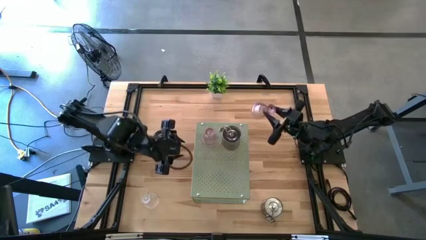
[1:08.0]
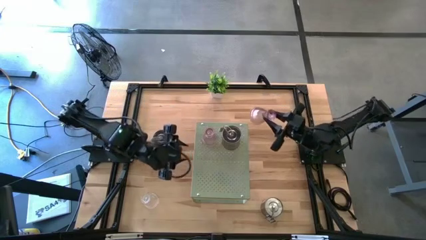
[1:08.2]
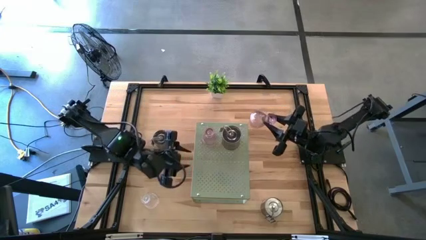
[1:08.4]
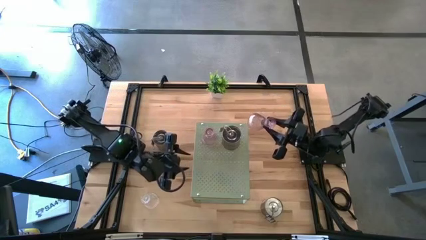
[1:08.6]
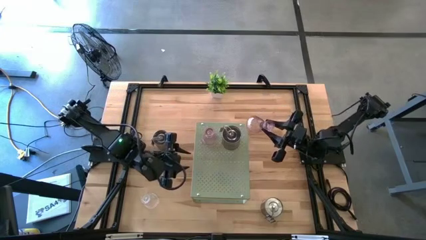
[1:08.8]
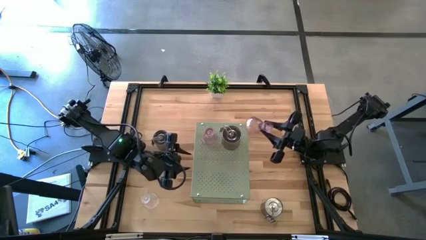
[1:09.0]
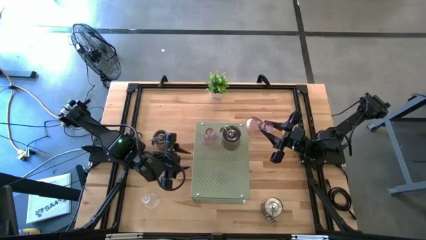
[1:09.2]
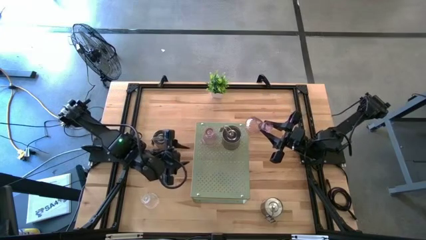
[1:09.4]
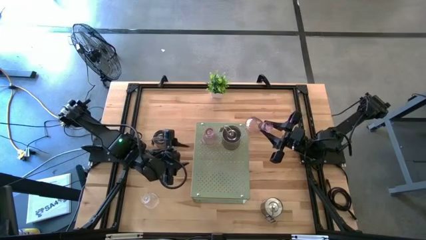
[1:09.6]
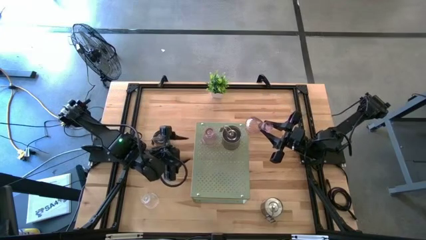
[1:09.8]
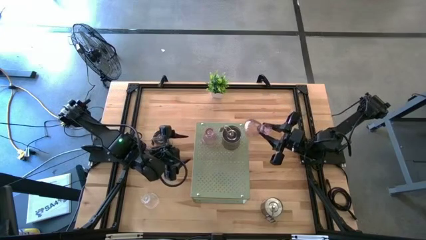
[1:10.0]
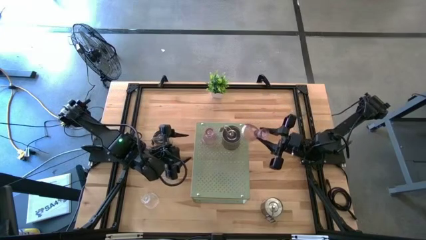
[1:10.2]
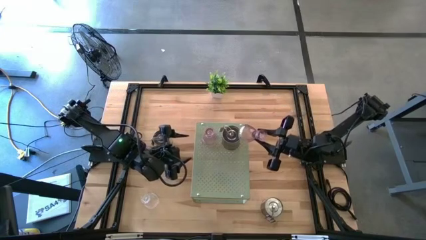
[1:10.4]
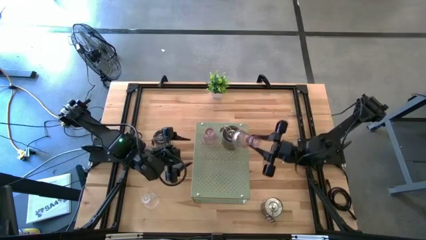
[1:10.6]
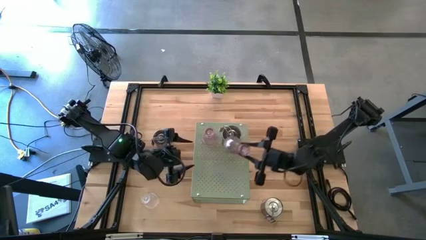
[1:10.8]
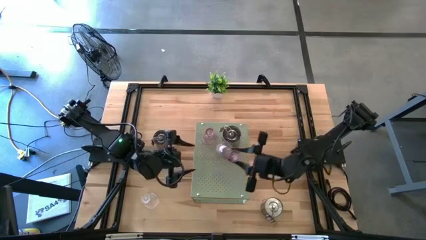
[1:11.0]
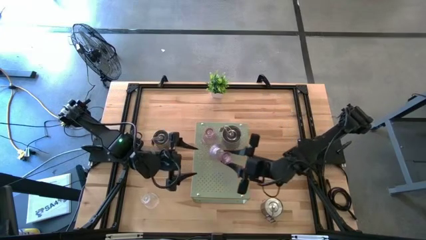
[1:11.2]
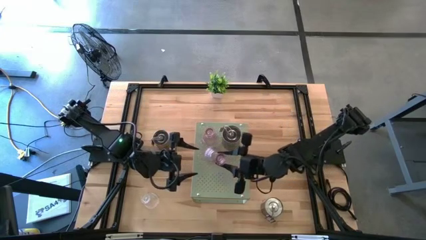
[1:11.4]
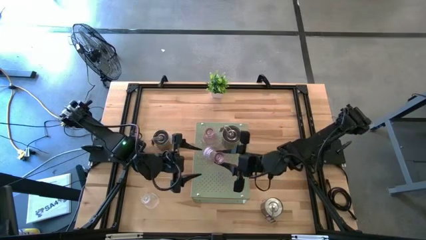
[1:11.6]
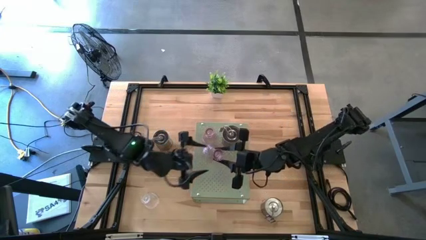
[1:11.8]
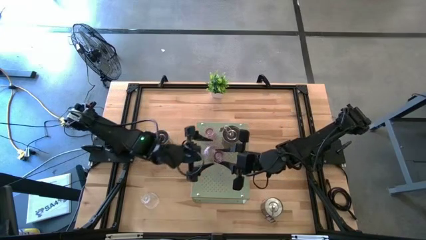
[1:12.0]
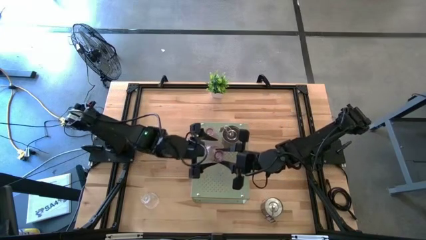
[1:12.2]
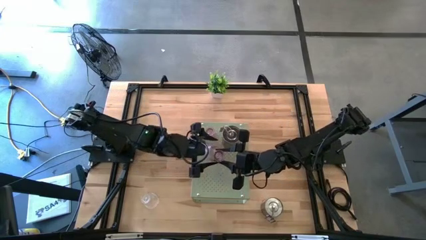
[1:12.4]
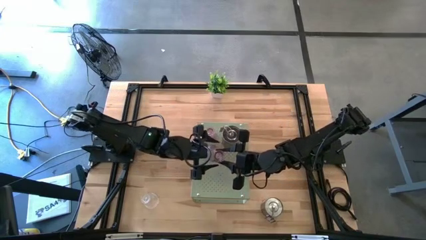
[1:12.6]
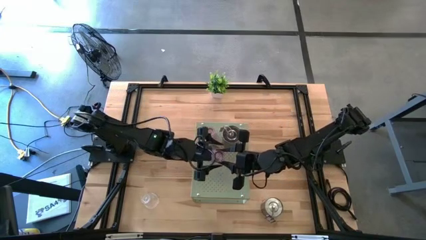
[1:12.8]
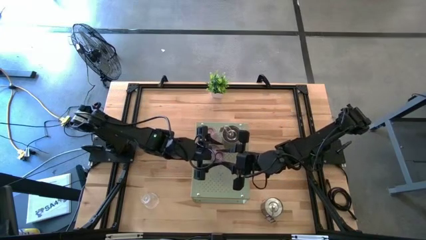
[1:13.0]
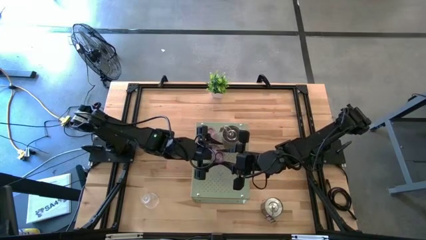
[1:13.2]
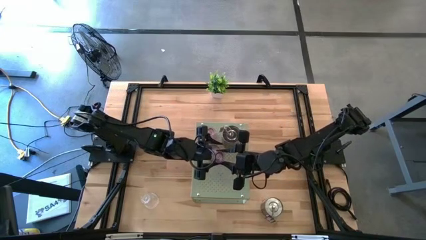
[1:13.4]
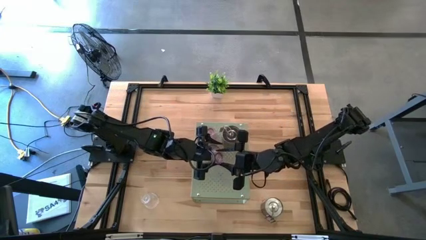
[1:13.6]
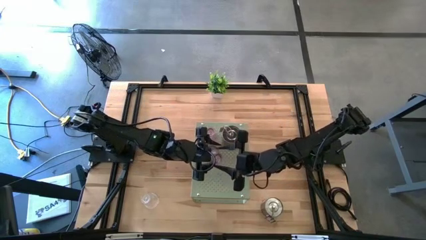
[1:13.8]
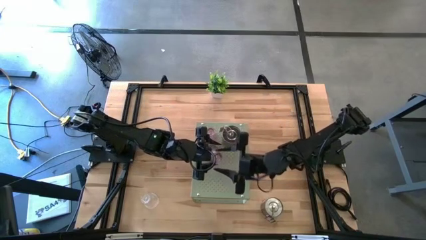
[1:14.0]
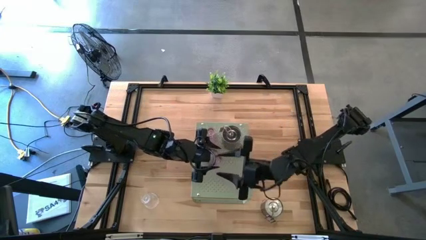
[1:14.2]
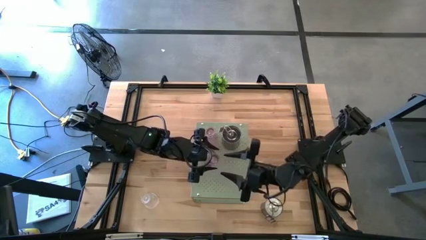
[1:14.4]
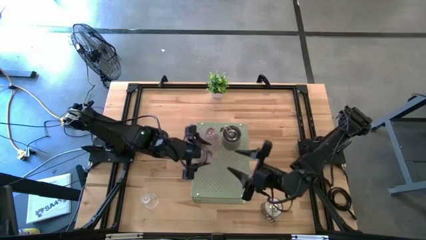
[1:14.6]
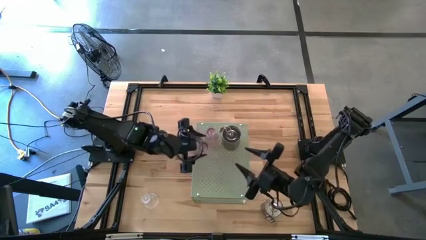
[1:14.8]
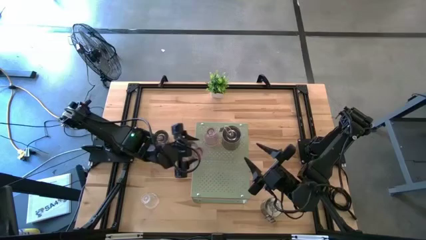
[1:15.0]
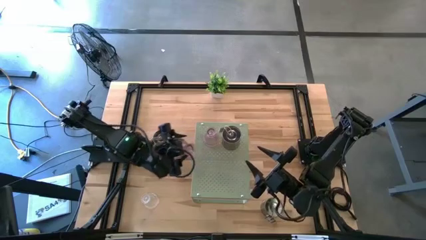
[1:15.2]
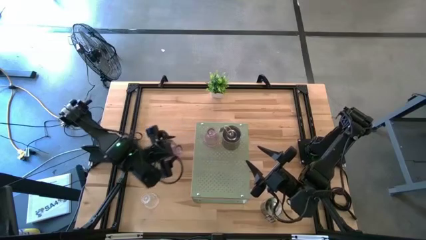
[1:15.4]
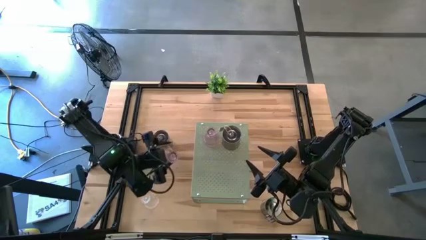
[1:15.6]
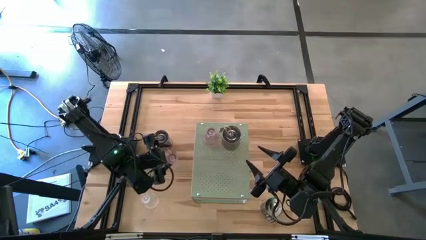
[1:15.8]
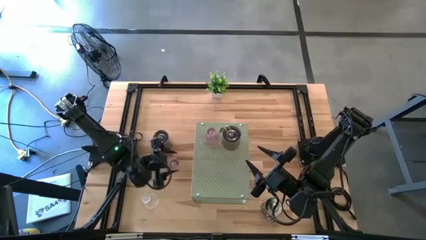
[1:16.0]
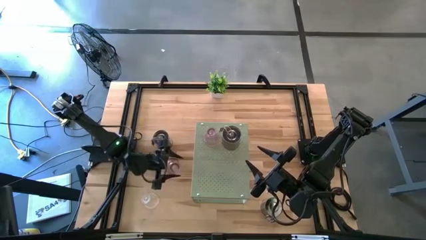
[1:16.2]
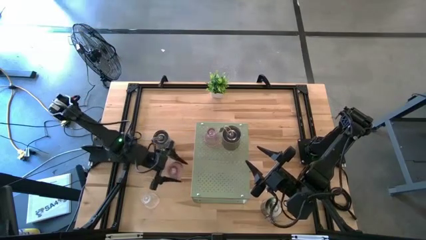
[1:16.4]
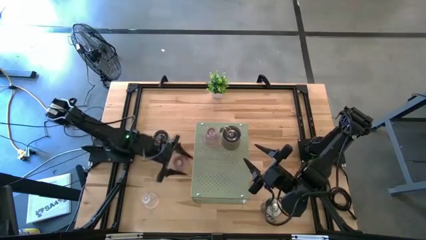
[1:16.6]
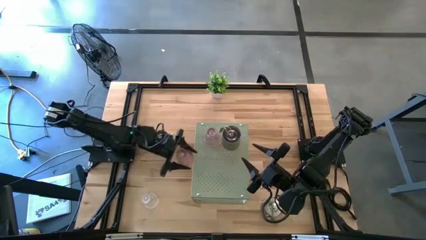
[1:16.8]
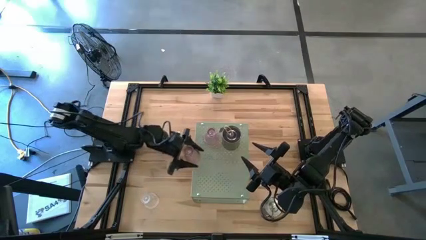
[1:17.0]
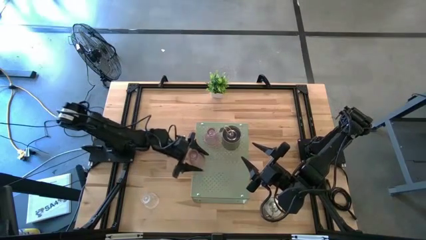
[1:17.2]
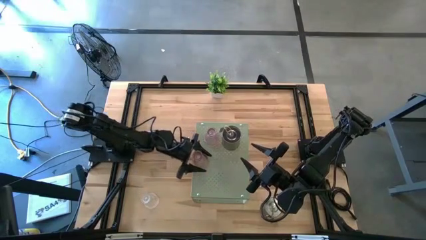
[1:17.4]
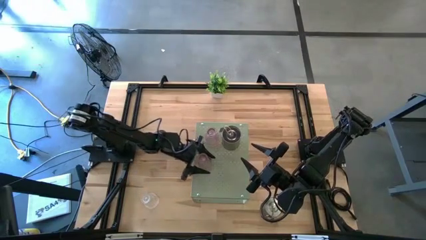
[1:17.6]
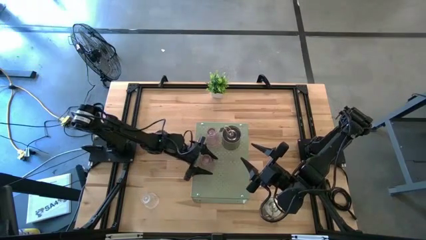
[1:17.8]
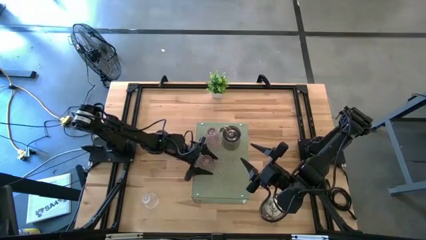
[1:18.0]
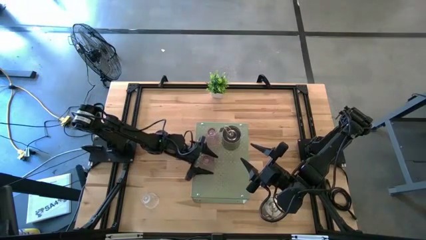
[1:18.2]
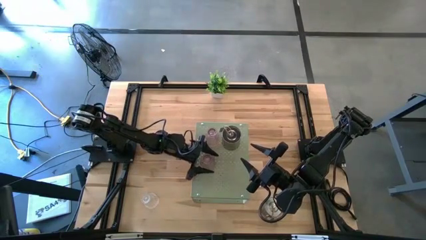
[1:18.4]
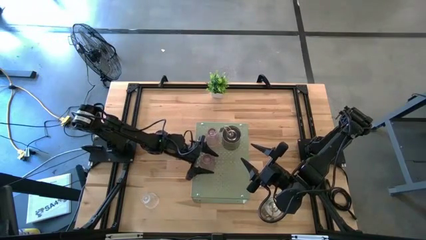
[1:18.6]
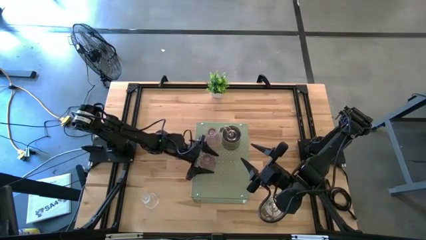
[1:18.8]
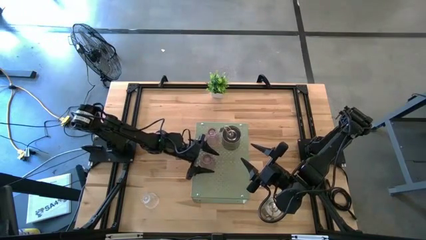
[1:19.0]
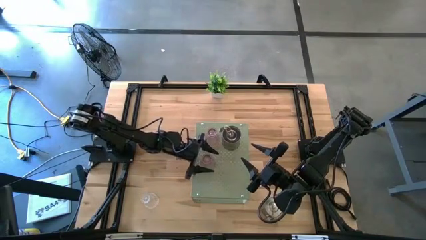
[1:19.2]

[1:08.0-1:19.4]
Task: Pick & Place candle stick holders
Put the pink transparent candle holder on the shelf
